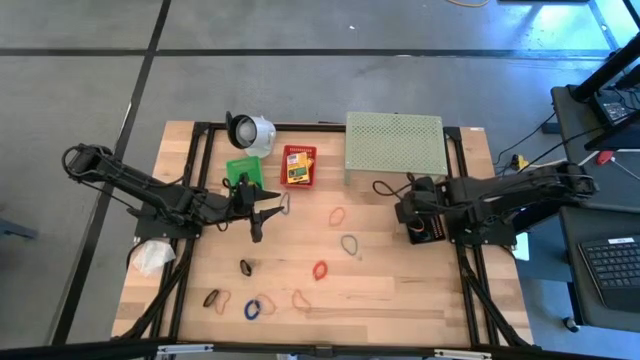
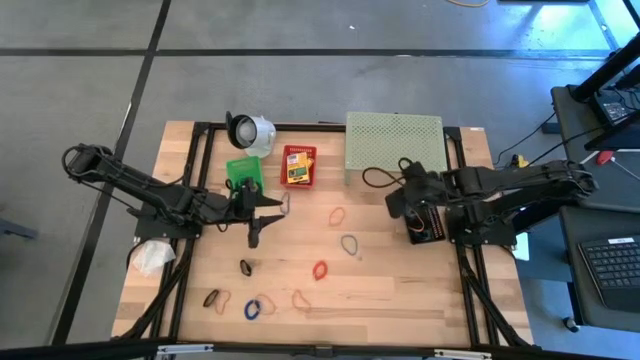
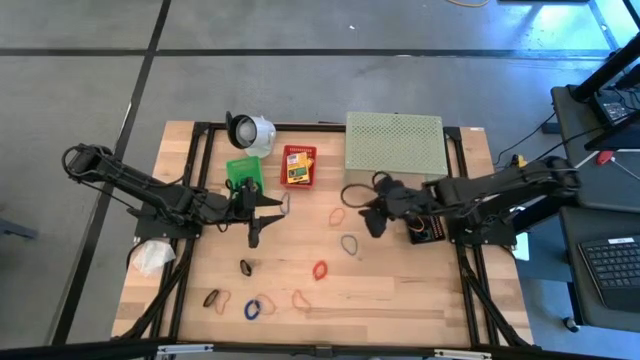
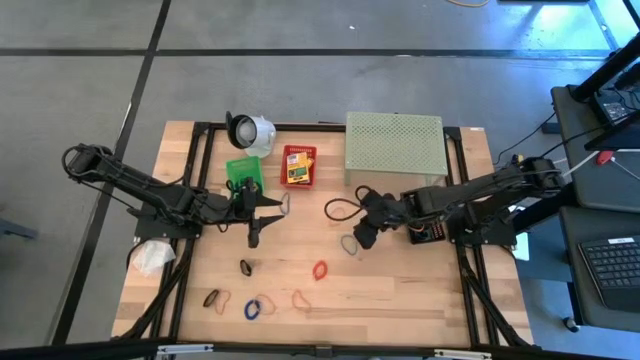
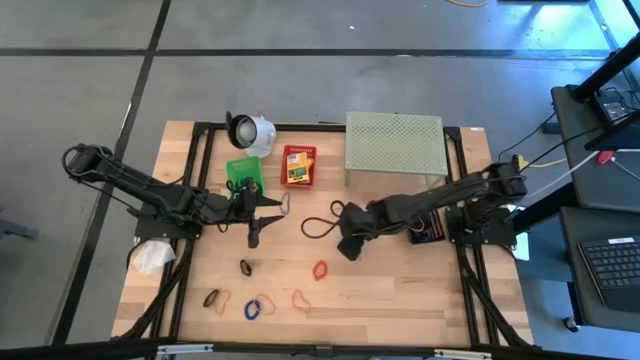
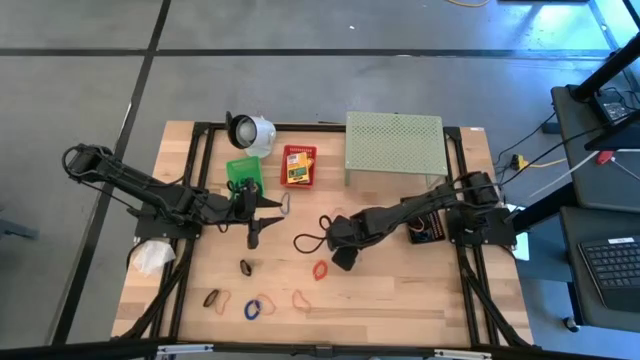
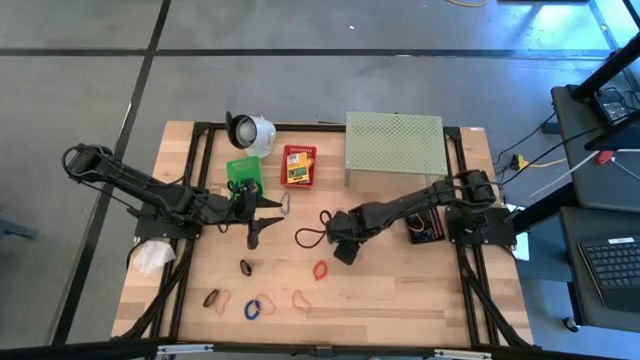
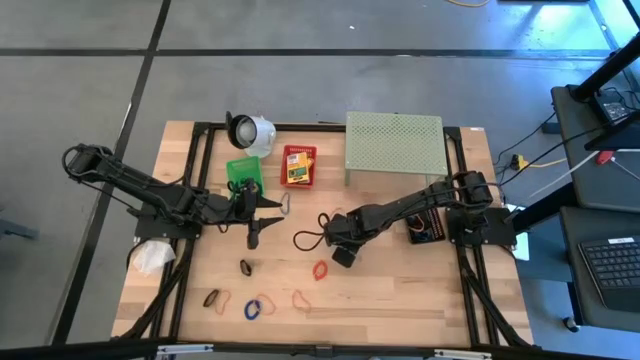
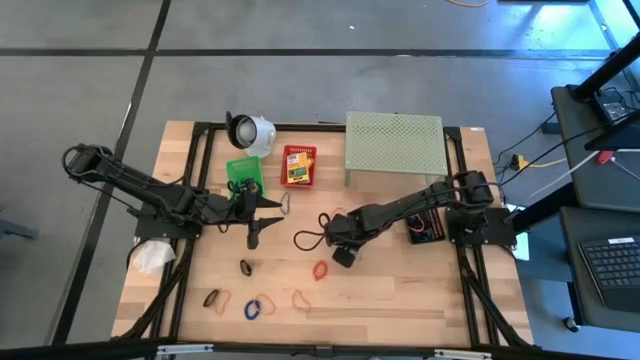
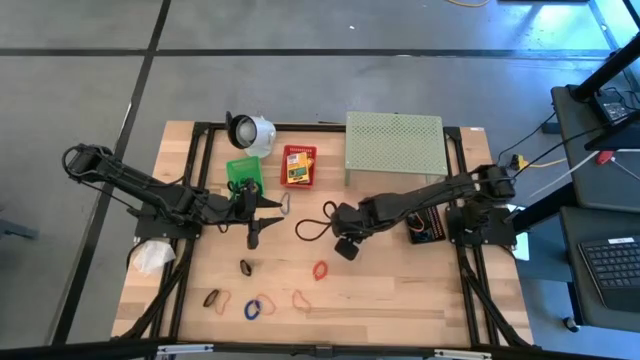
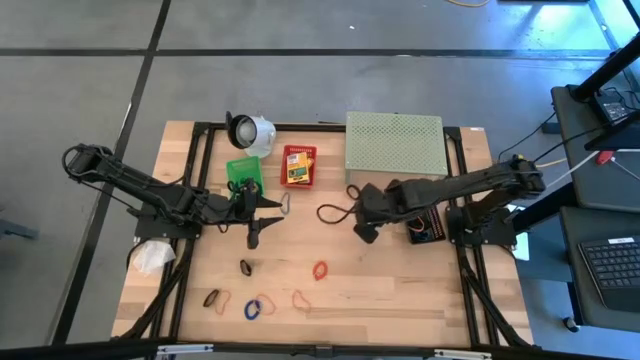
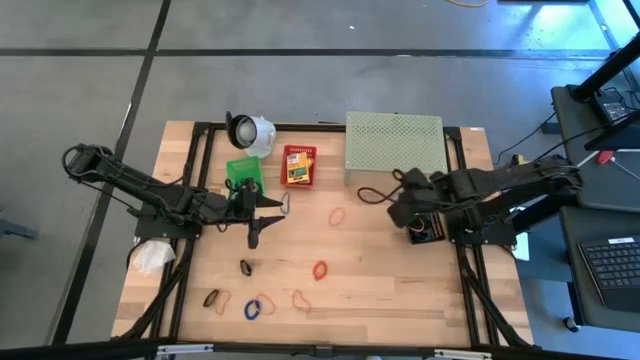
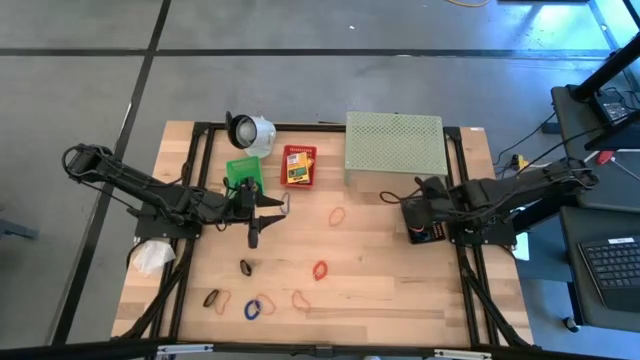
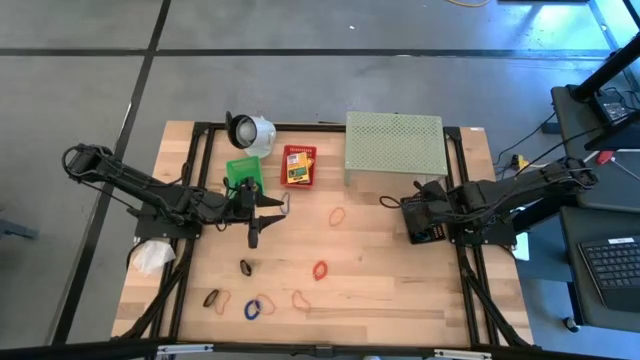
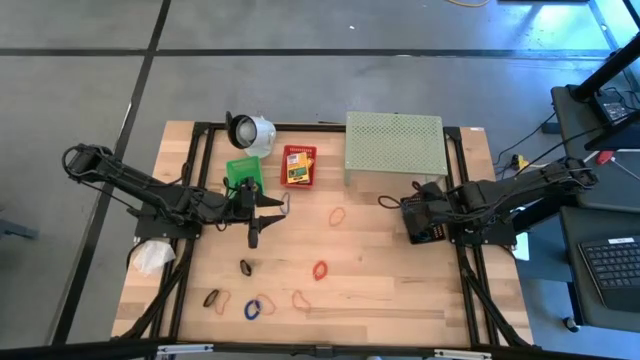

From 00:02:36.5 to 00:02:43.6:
Task: Pick & Place Office Desk Supplies
Put the blue rubber band into the black basket

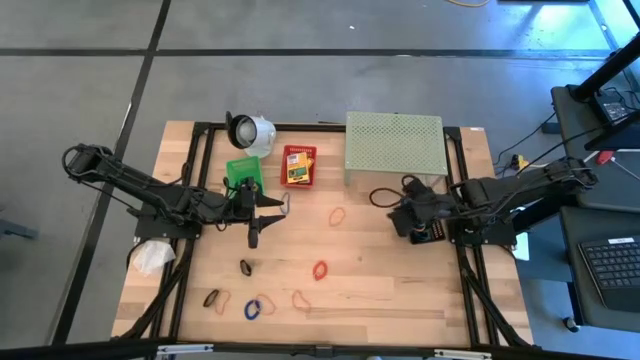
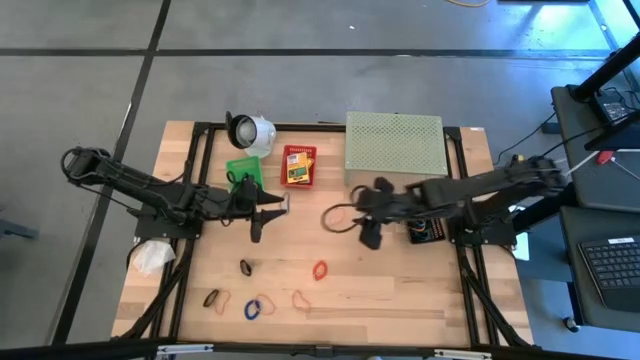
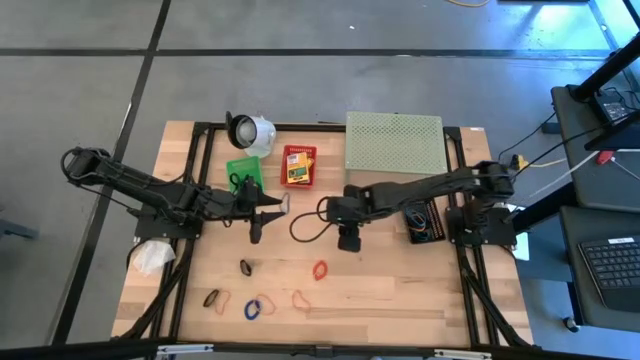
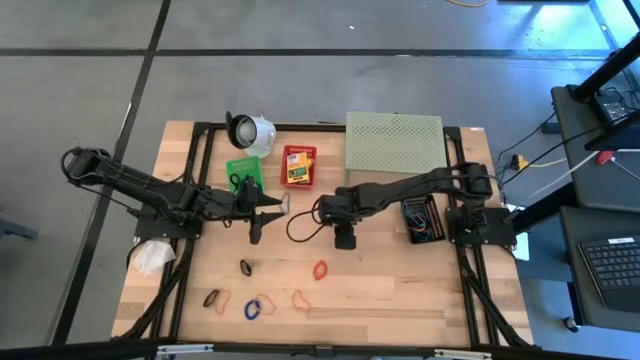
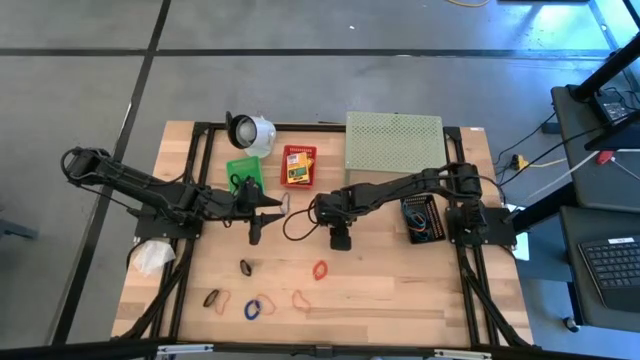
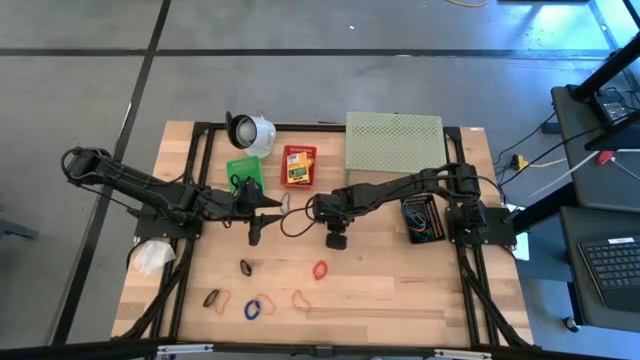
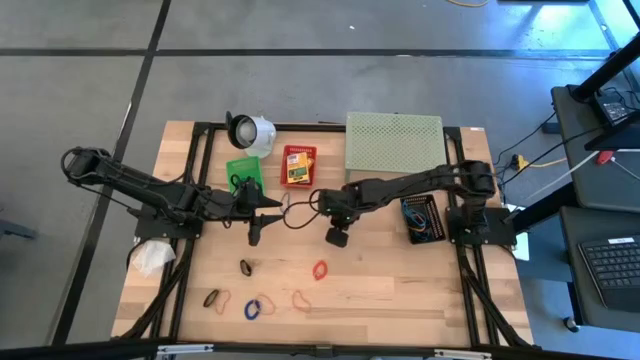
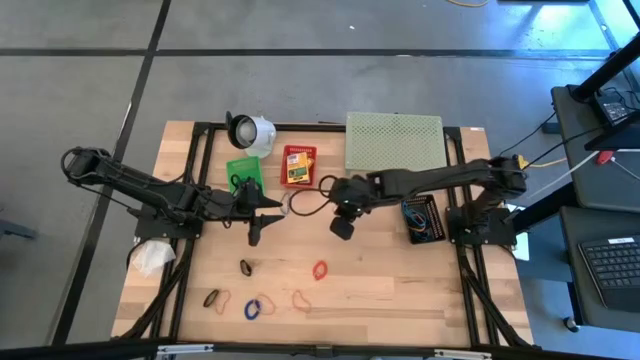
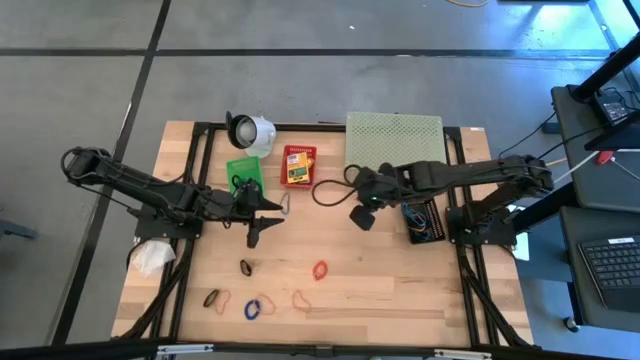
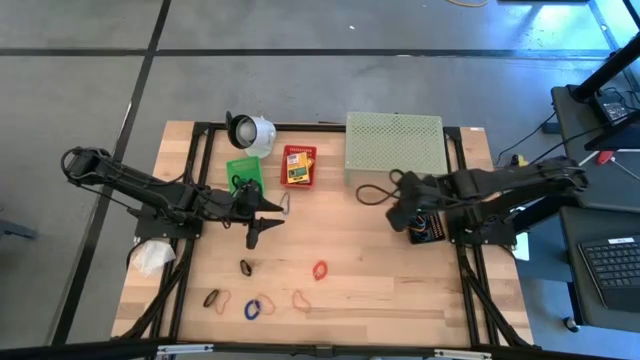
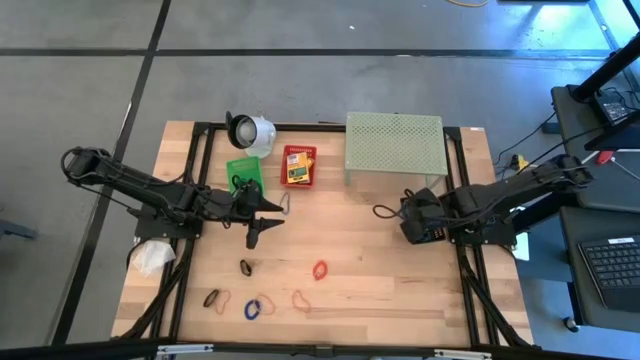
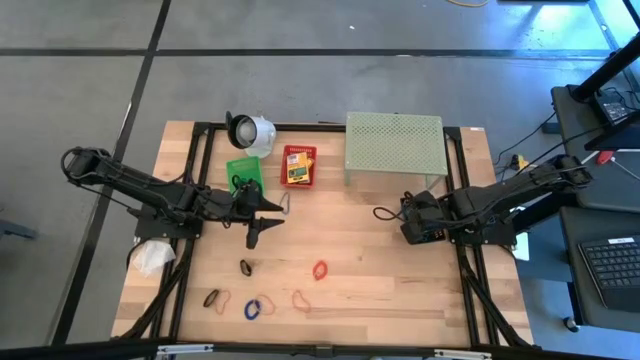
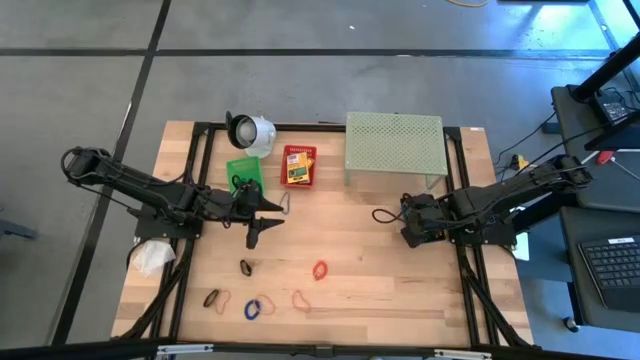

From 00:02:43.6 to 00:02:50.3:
Put the orange rubber band into the black basket

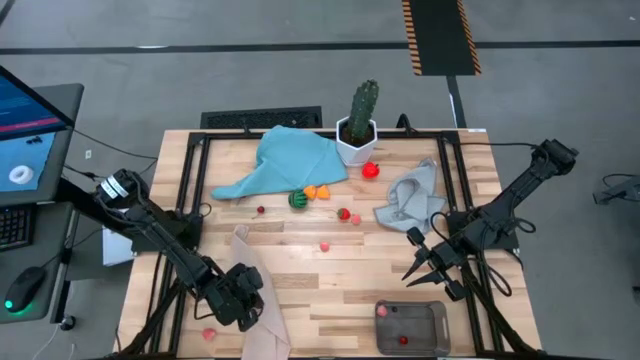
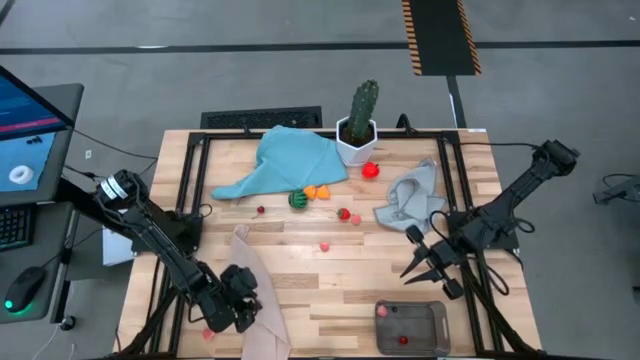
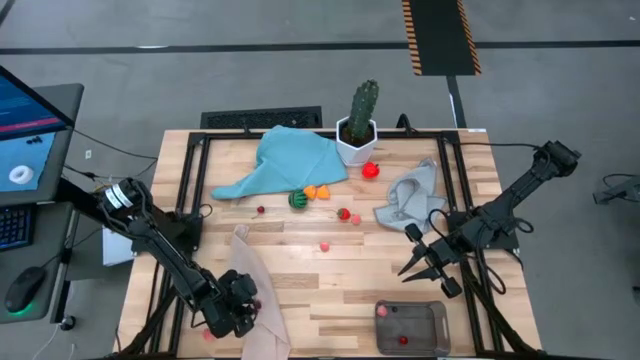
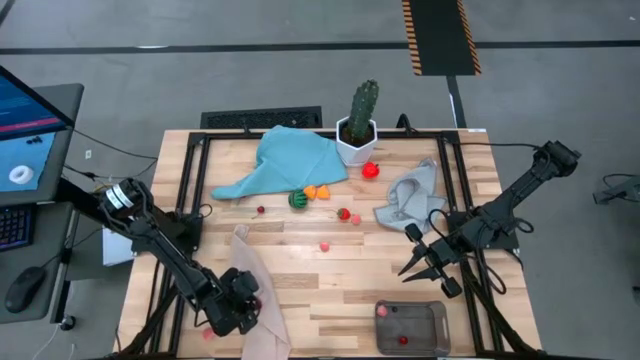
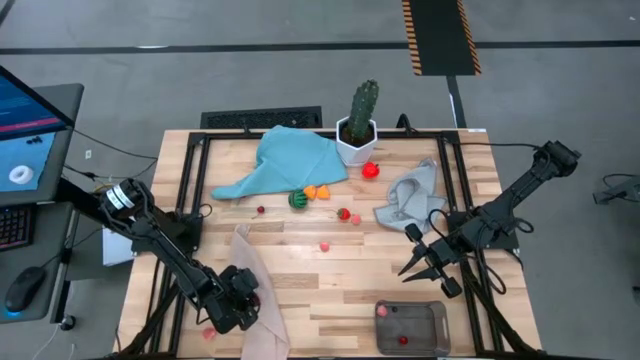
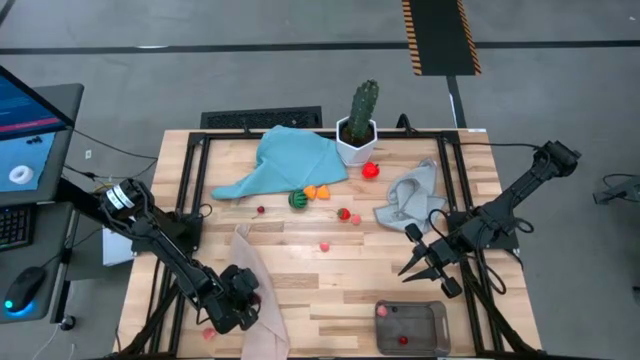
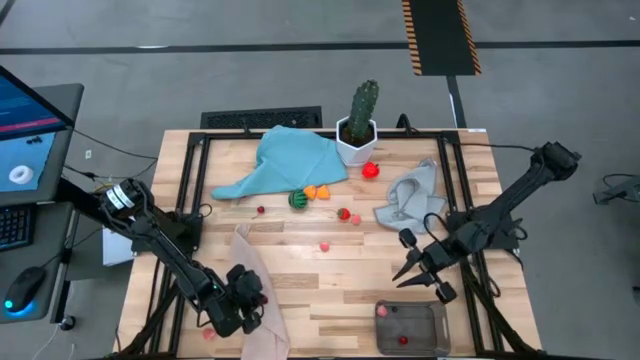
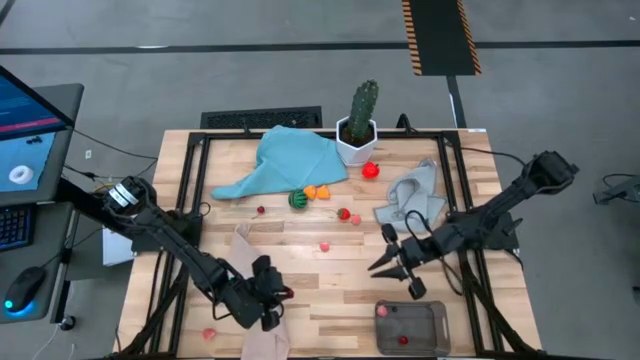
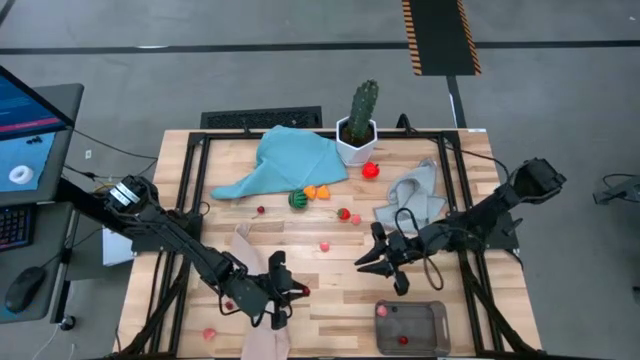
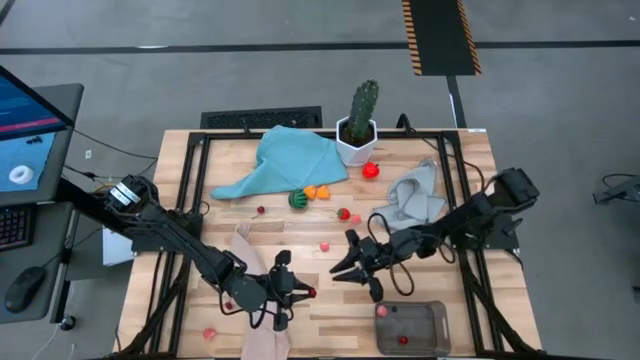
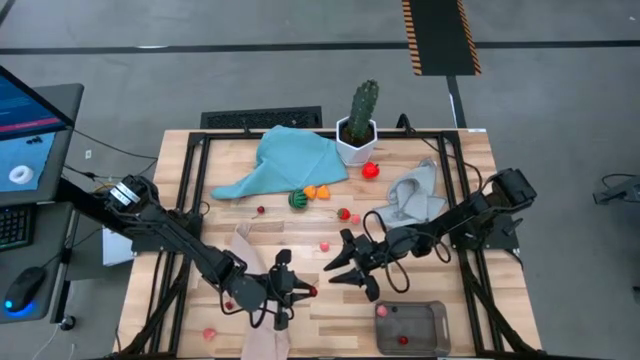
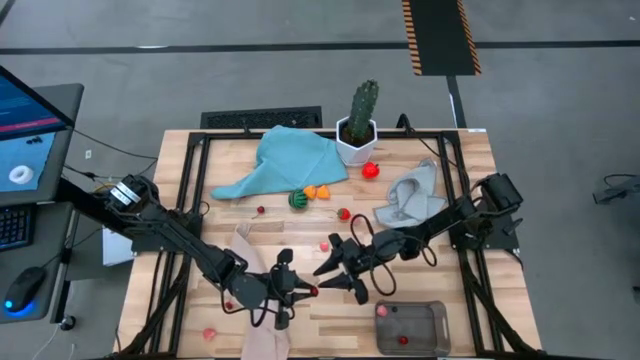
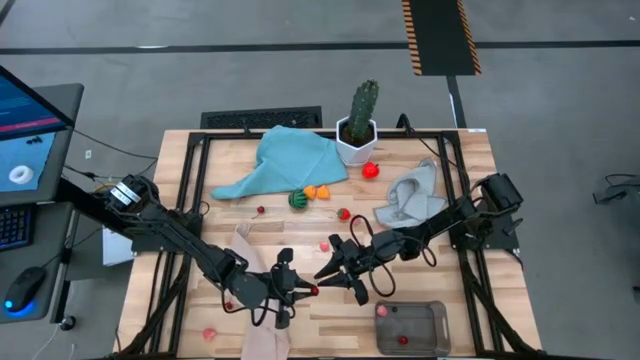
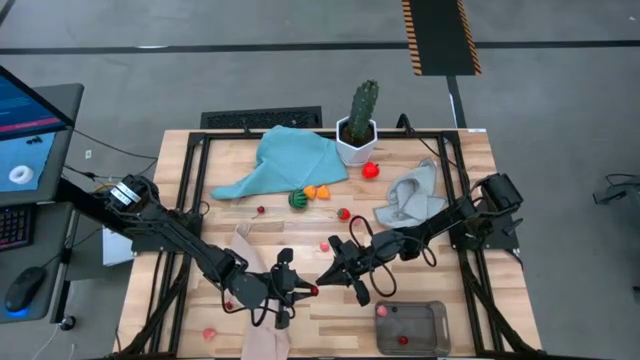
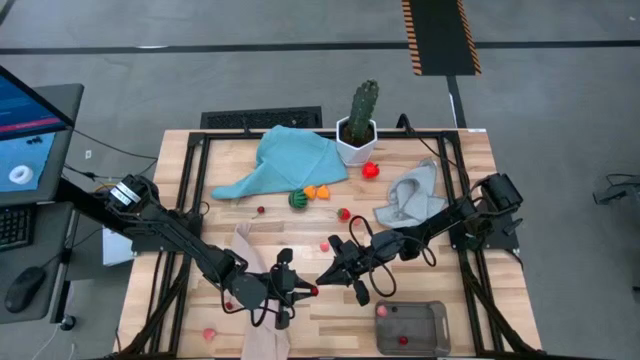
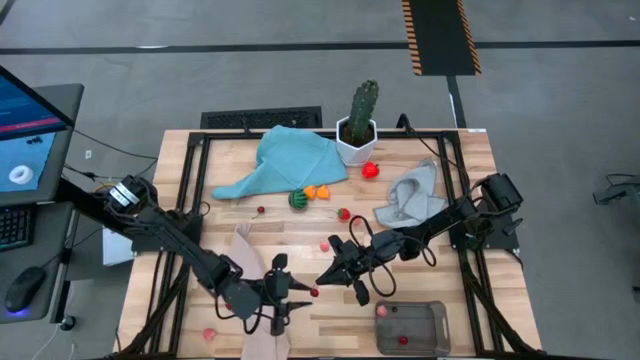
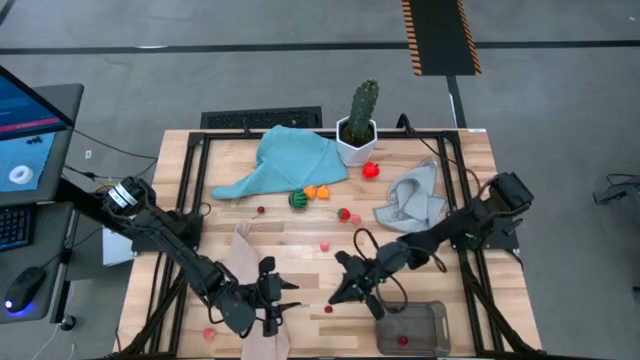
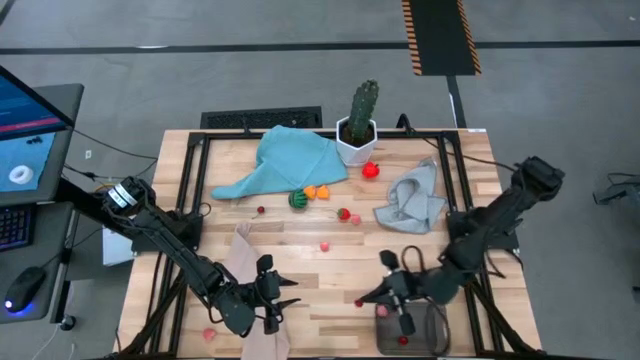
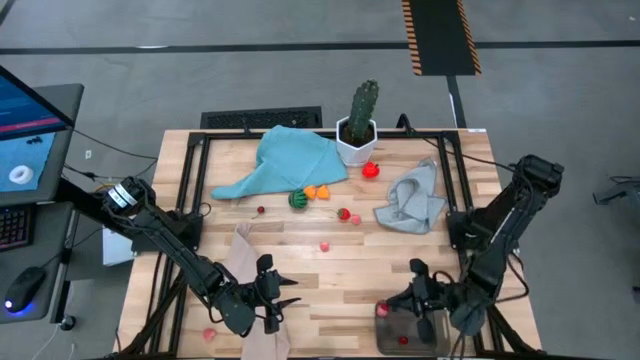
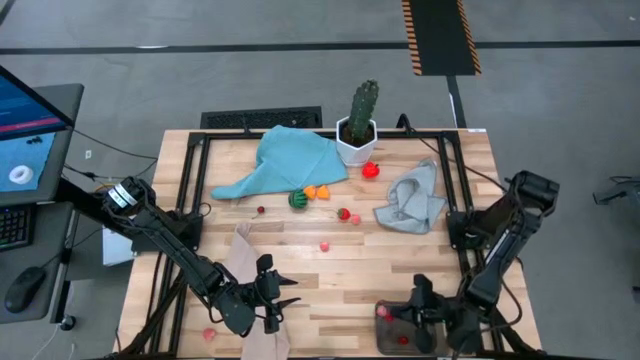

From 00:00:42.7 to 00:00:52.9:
Task: Pick and placing Produce into tupperware
Put the cherry into the black bin
